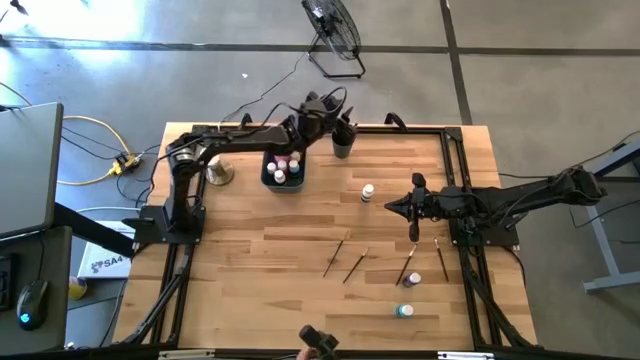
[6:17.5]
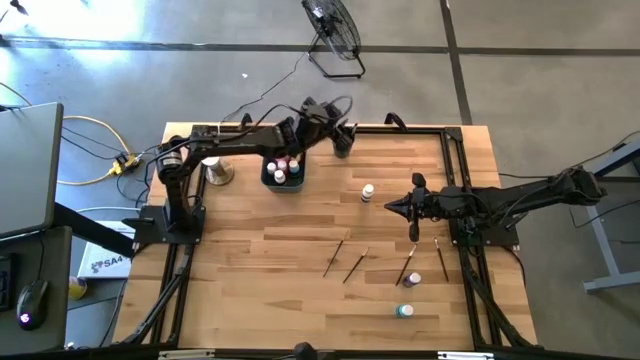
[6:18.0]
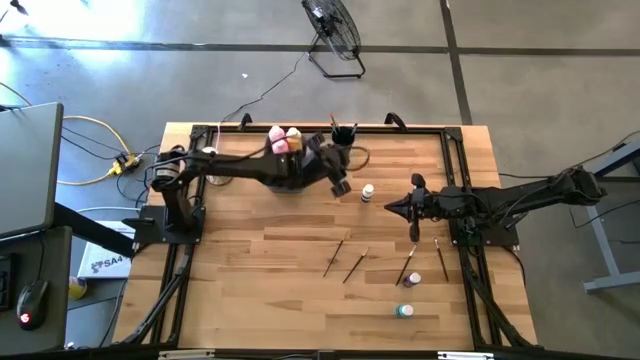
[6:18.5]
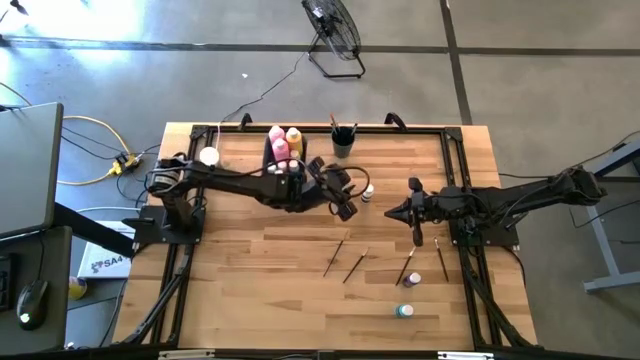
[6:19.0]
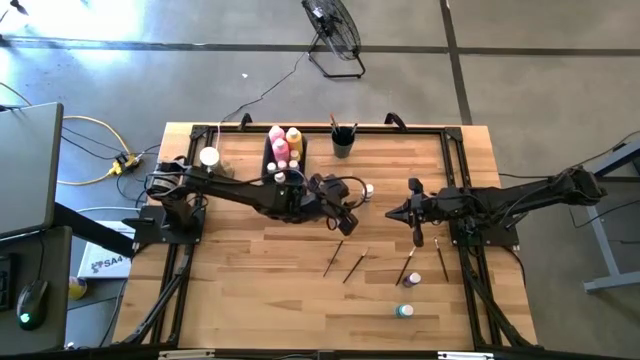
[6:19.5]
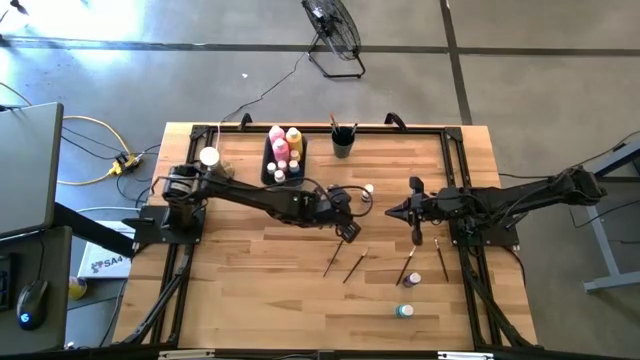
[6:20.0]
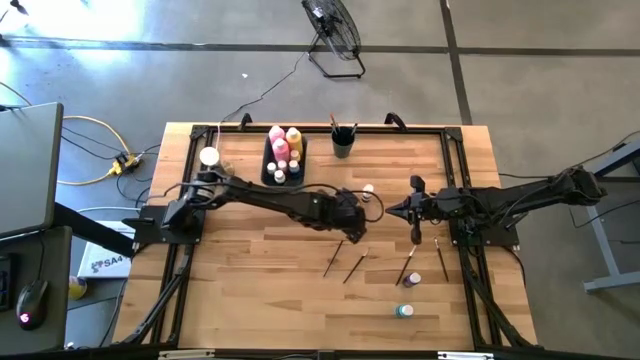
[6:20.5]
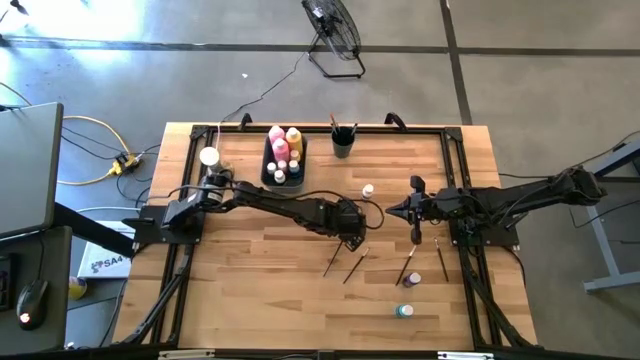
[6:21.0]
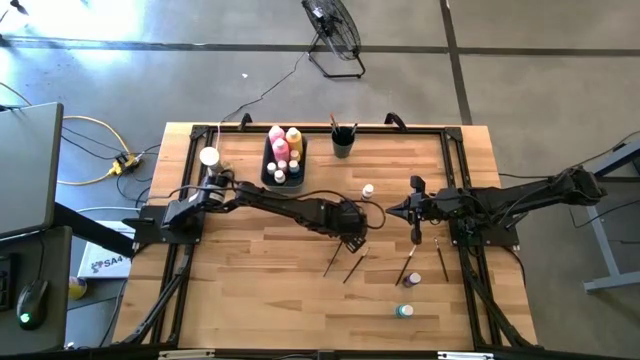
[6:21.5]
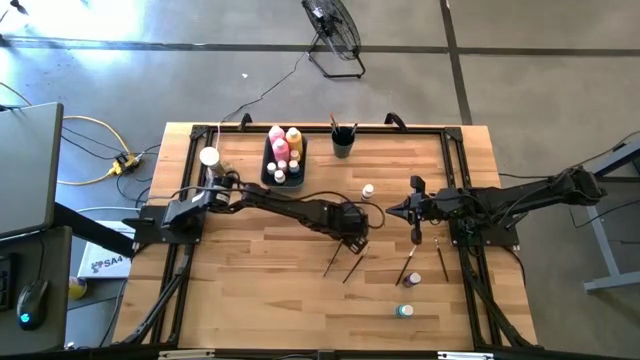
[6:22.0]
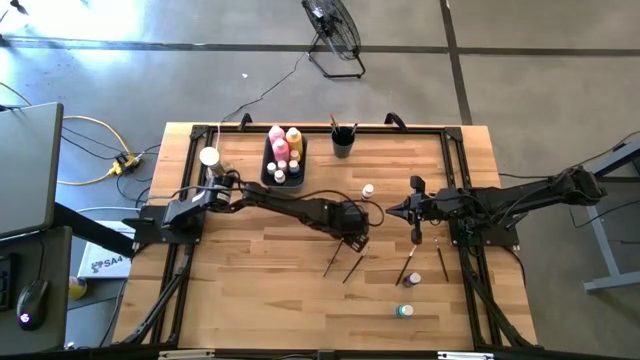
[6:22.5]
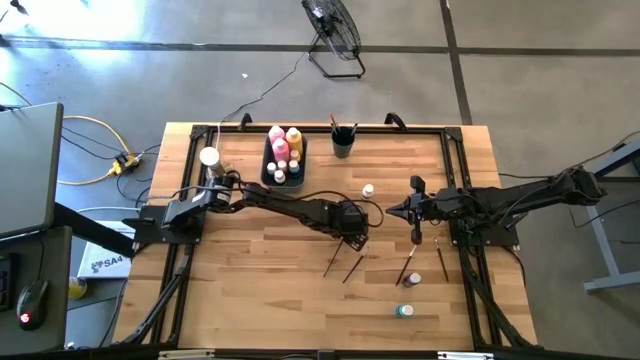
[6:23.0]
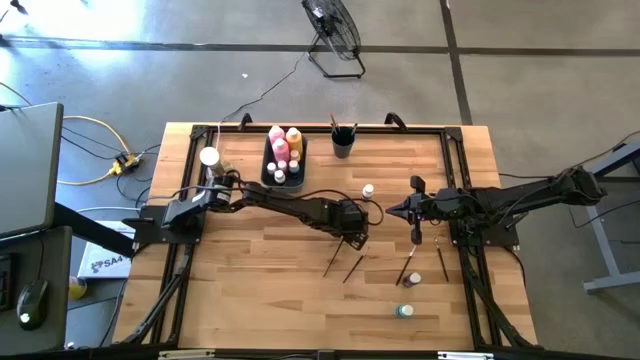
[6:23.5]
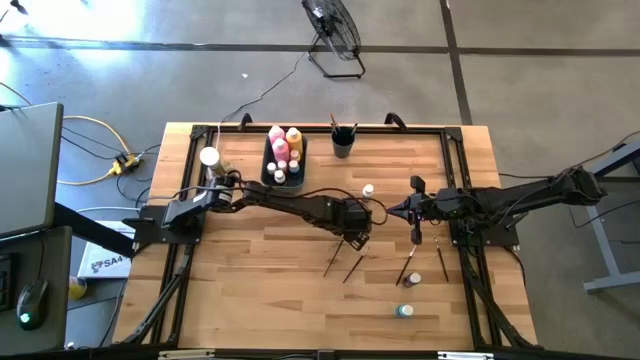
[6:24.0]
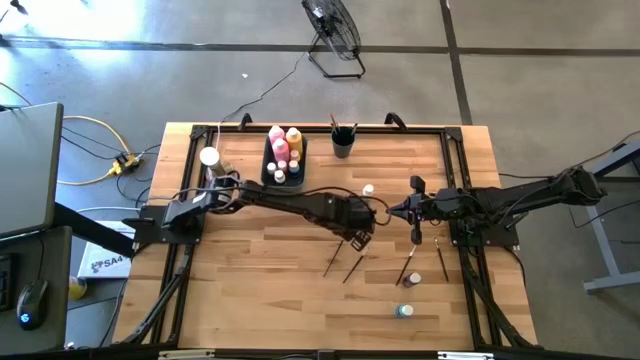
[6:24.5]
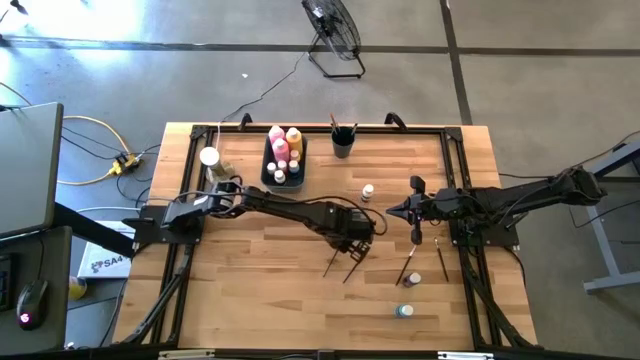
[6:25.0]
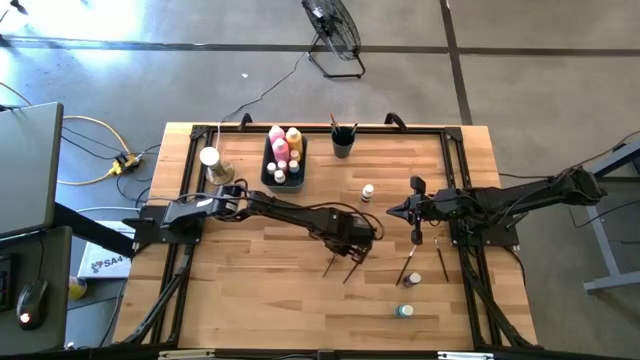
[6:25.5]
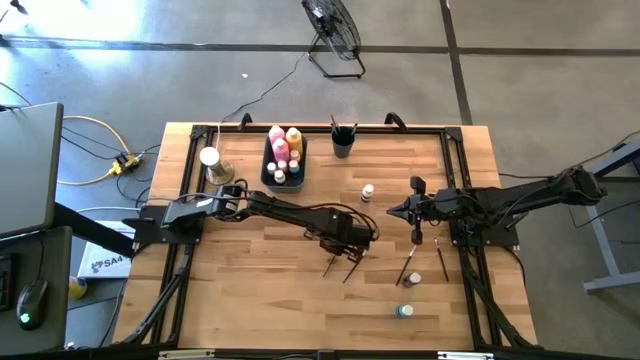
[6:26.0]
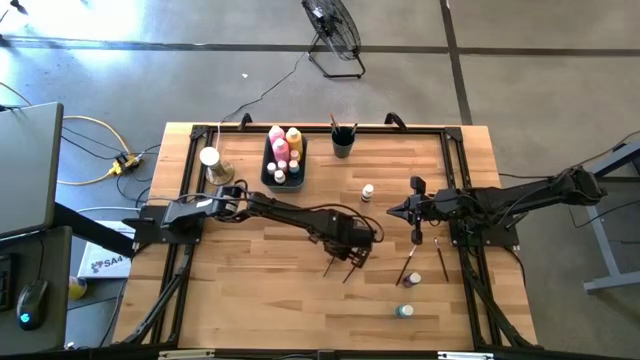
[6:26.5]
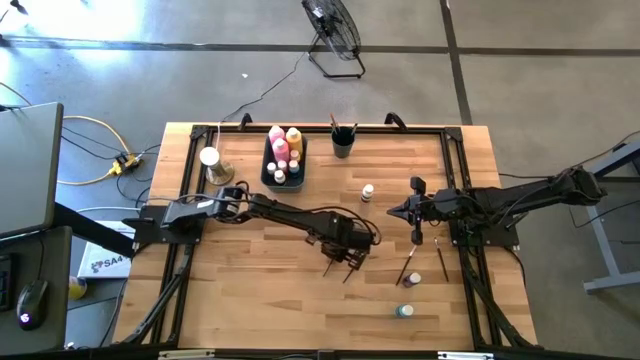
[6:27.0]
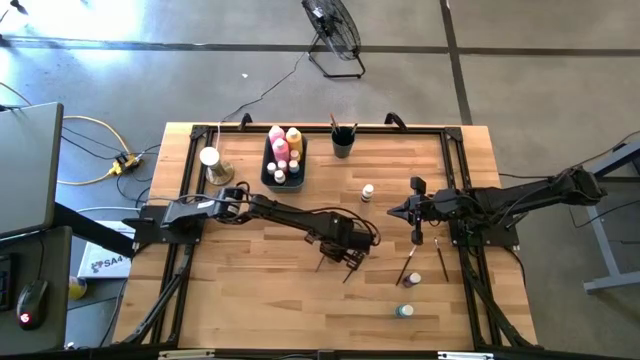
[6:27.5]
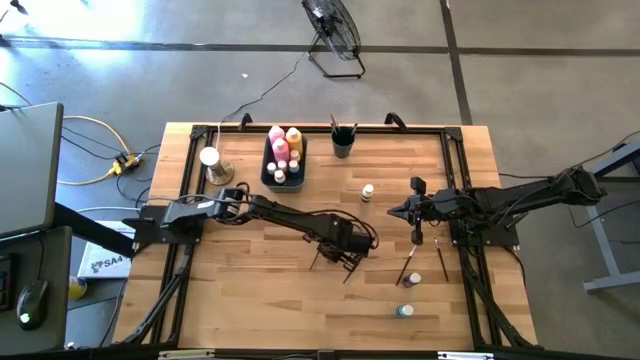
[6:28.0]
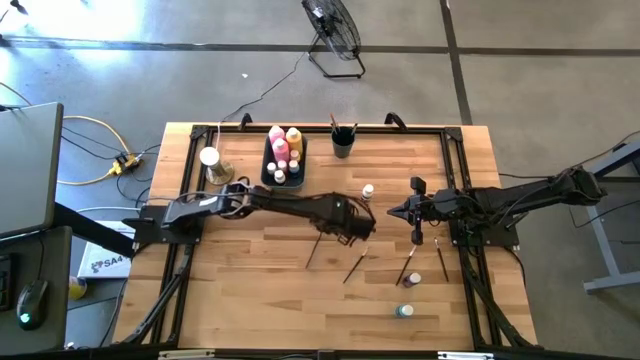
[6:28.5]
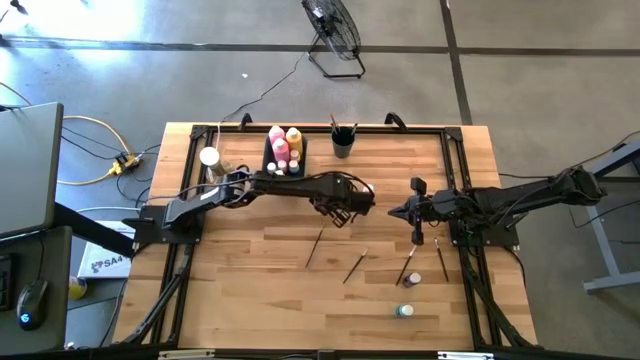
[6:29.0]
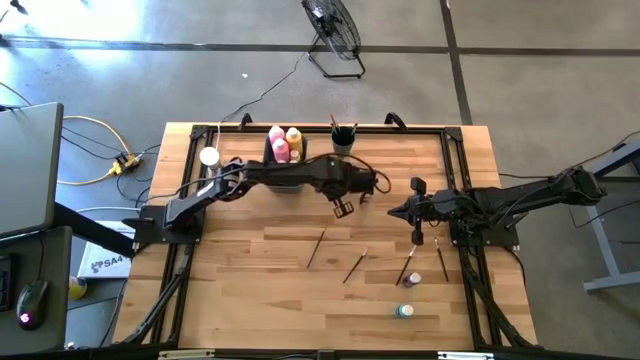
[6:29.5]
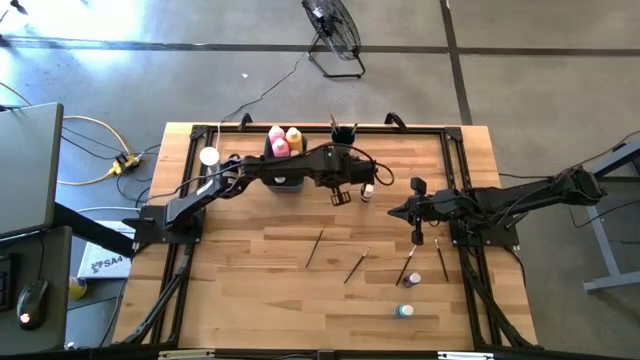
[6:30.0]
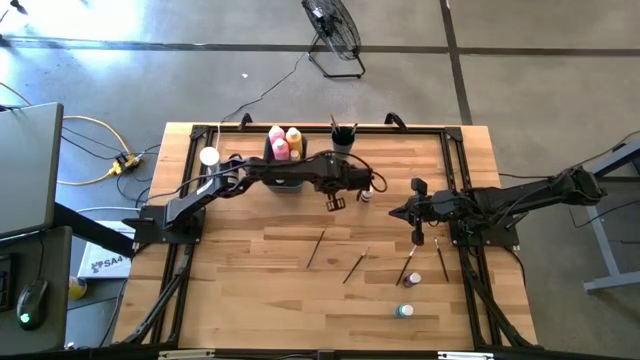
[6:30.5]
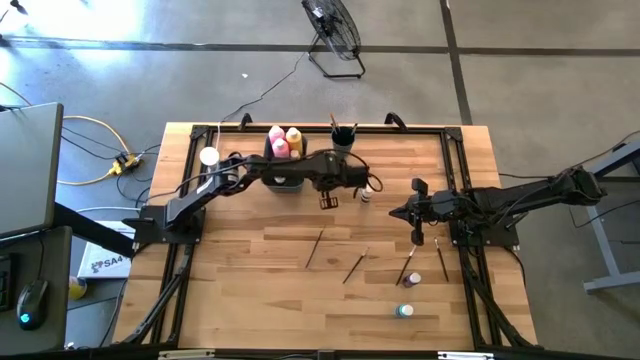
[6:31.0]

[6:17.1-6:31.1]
Task: Pick & Place Paint Supplies
Put the gold paint brush into the green cup

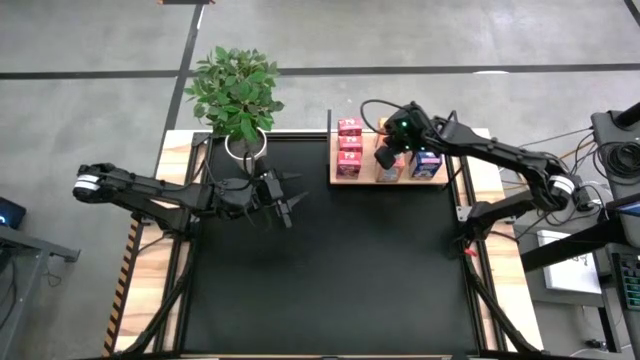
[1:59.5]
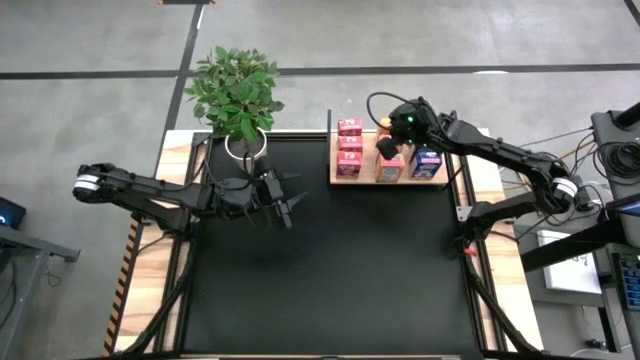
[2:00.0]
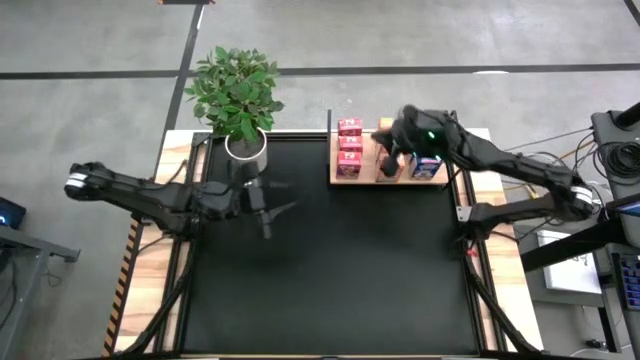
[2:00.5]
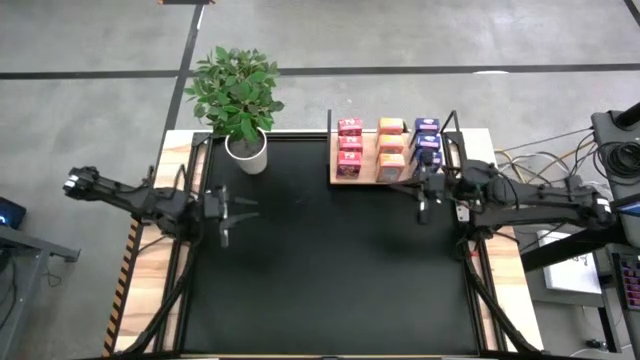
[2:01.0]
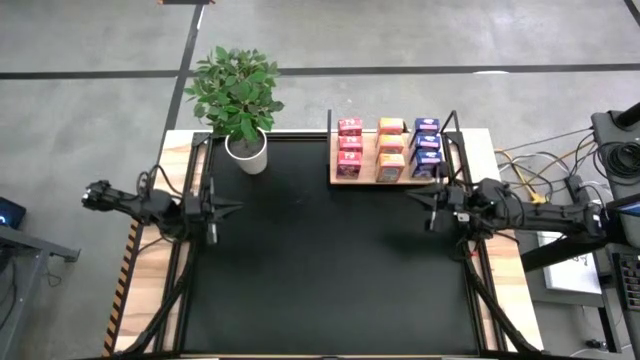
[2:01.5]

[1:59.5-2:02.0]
Task: Stack cereal on shelf
Return to Home Position
